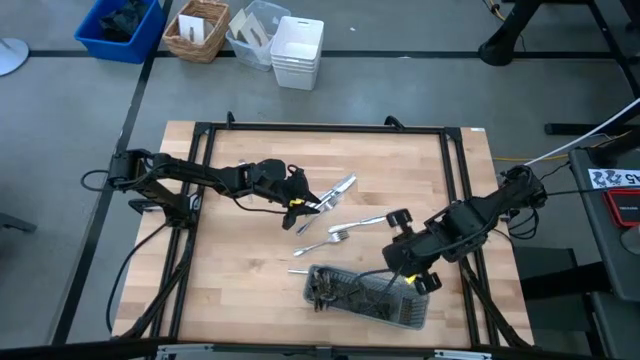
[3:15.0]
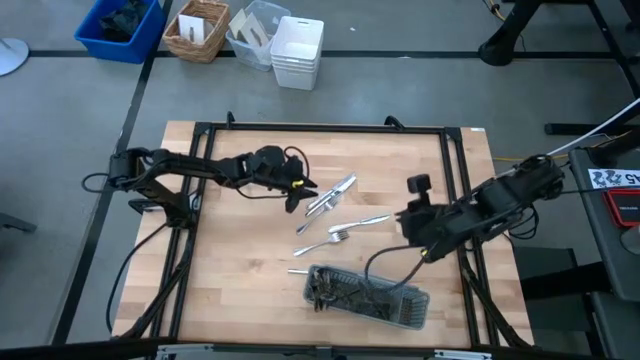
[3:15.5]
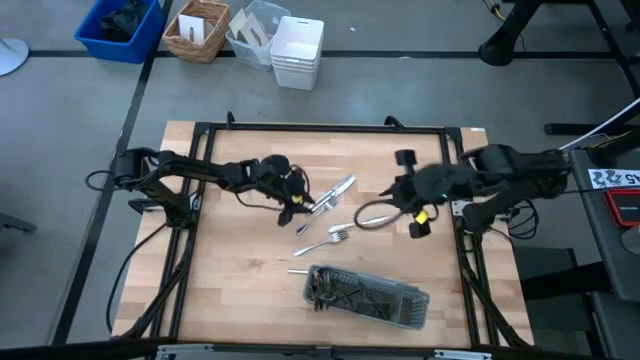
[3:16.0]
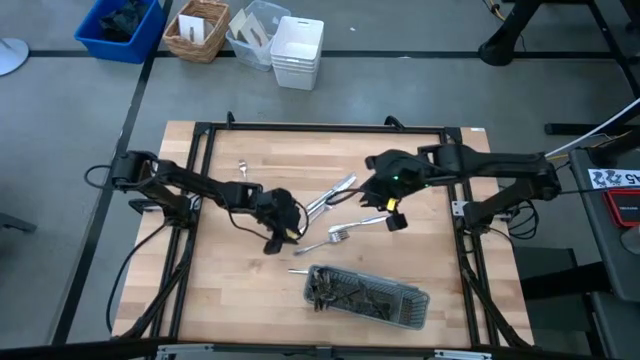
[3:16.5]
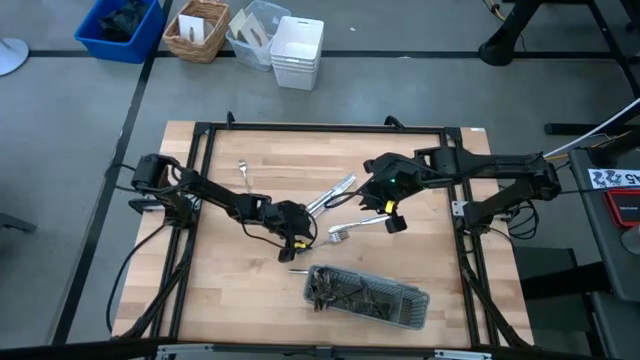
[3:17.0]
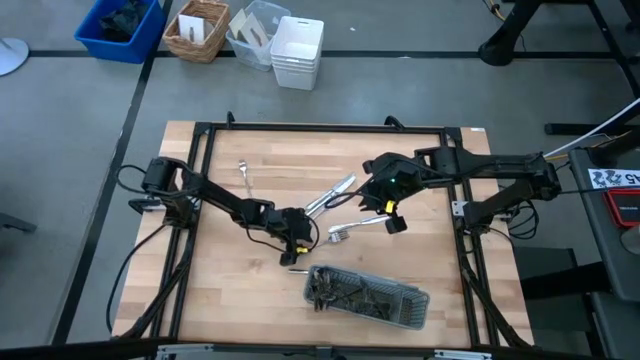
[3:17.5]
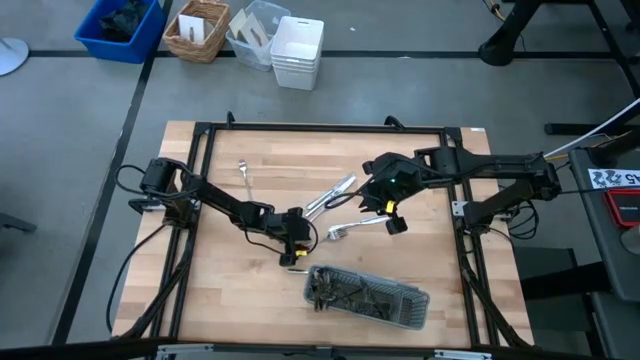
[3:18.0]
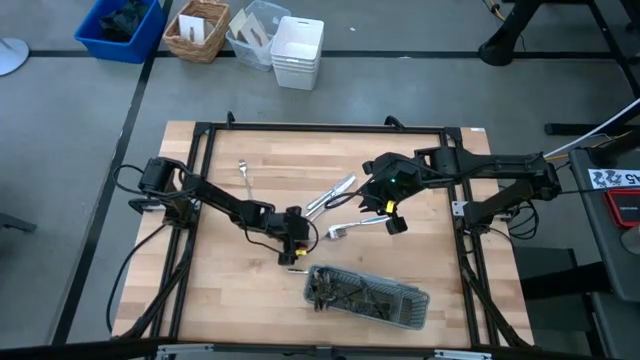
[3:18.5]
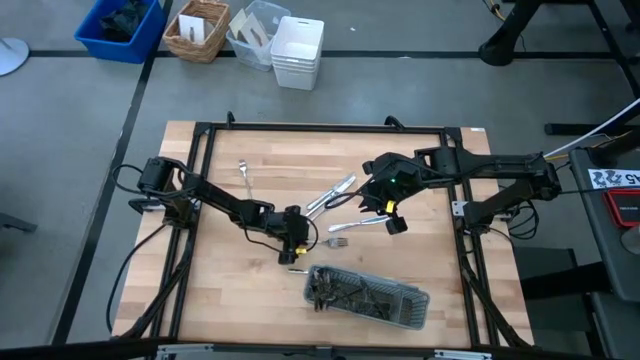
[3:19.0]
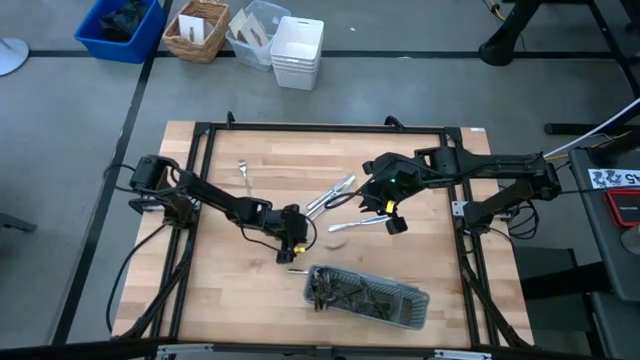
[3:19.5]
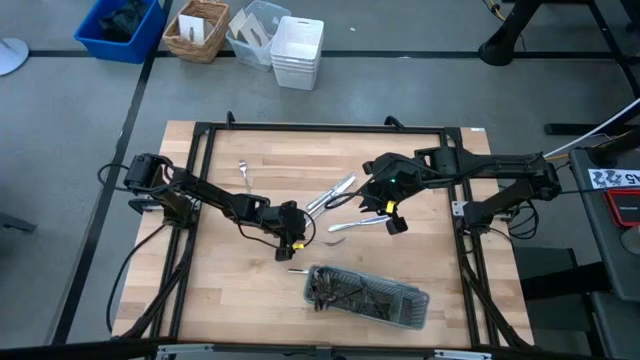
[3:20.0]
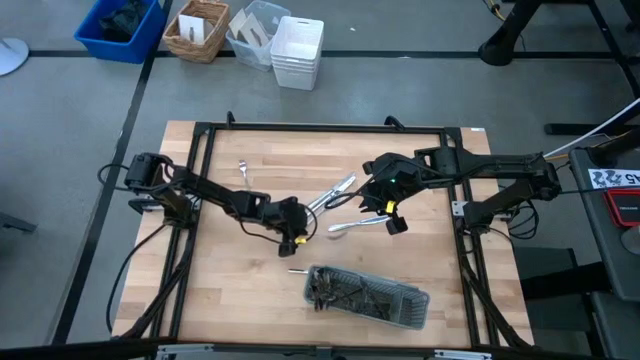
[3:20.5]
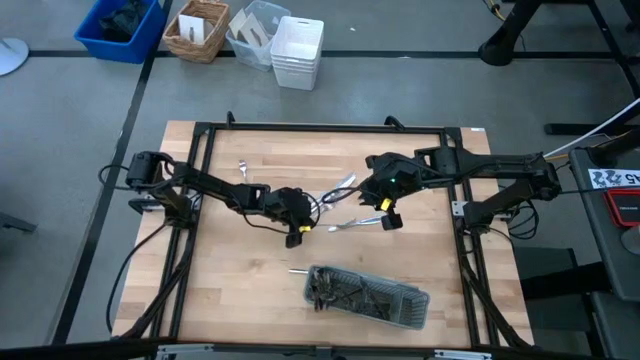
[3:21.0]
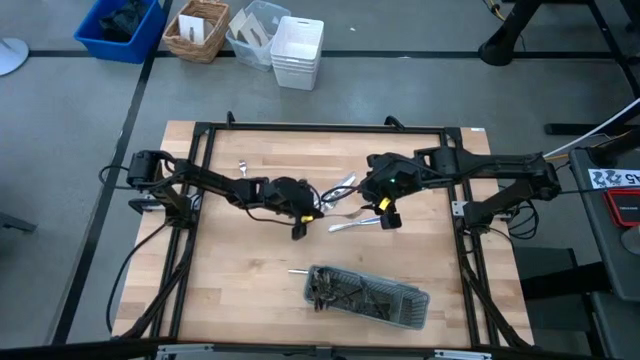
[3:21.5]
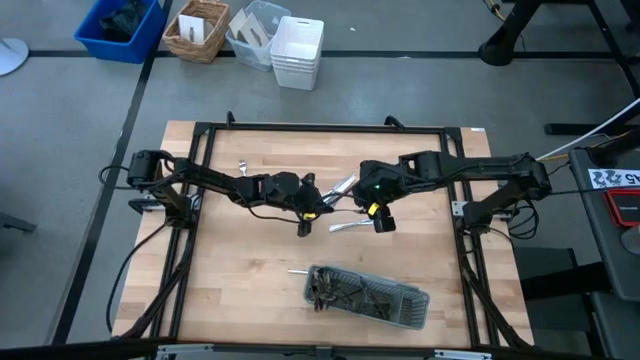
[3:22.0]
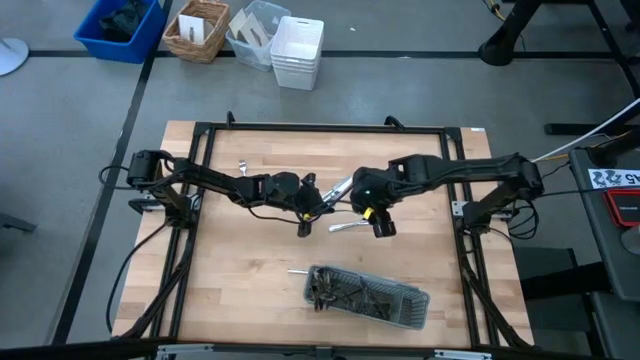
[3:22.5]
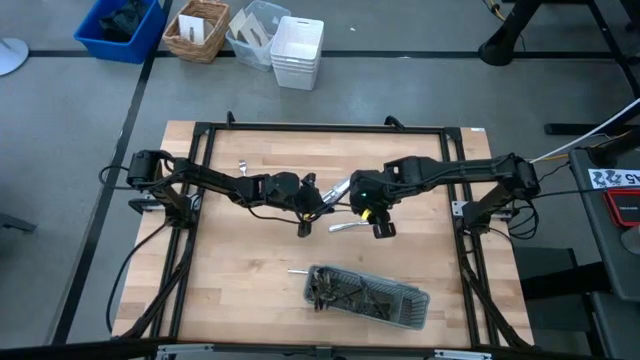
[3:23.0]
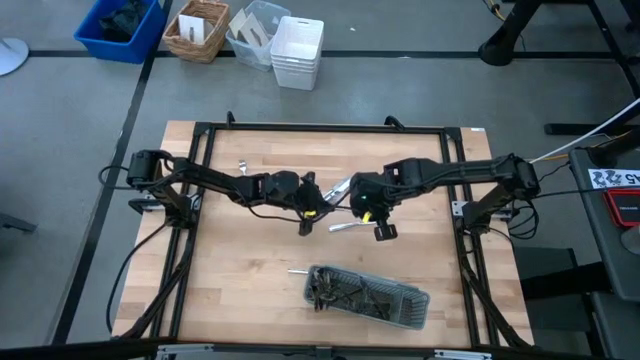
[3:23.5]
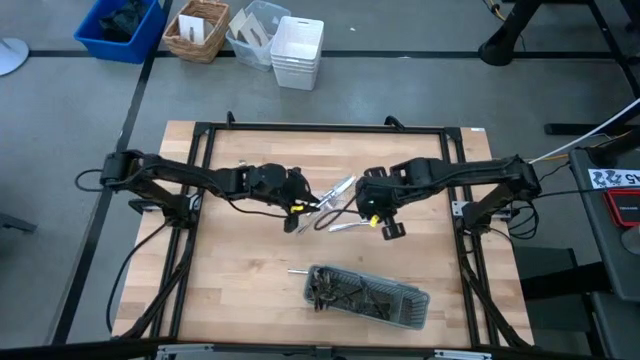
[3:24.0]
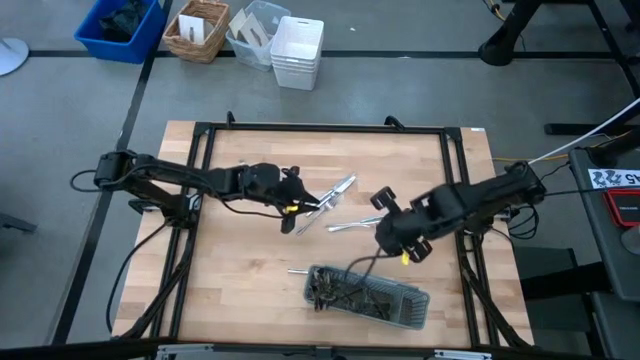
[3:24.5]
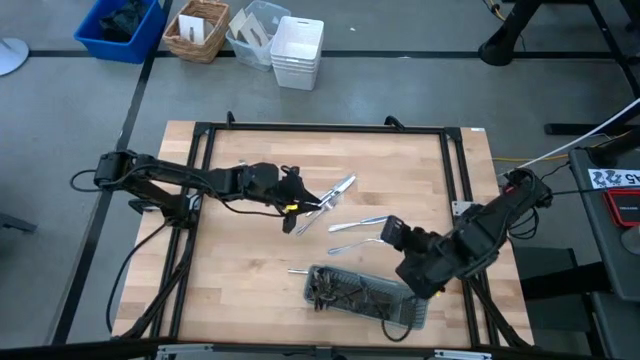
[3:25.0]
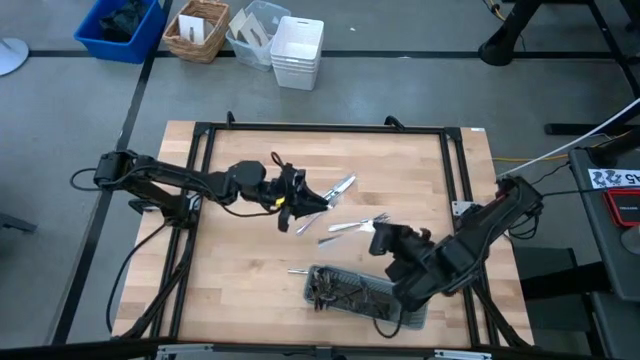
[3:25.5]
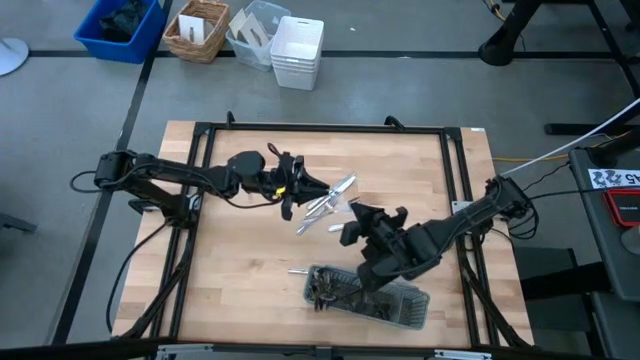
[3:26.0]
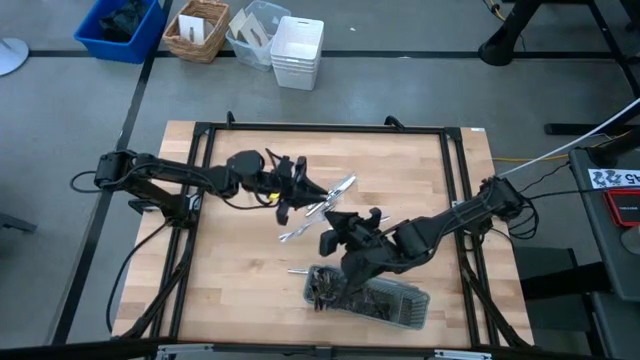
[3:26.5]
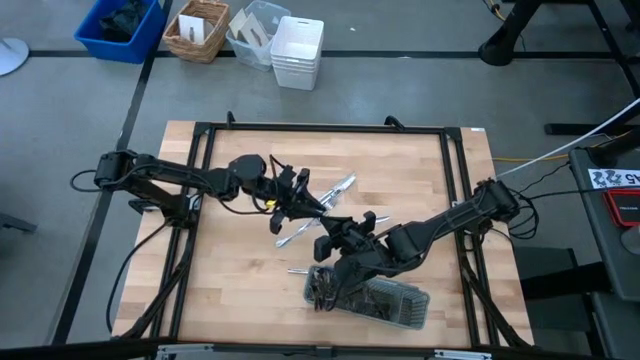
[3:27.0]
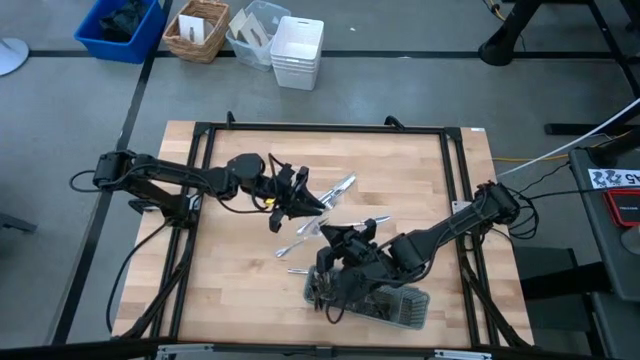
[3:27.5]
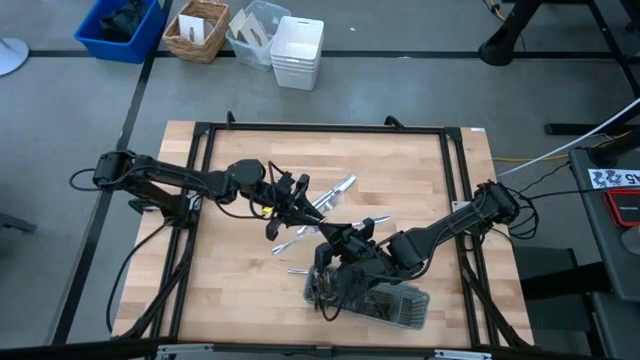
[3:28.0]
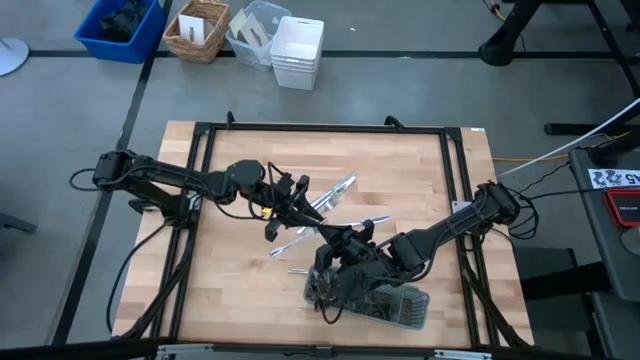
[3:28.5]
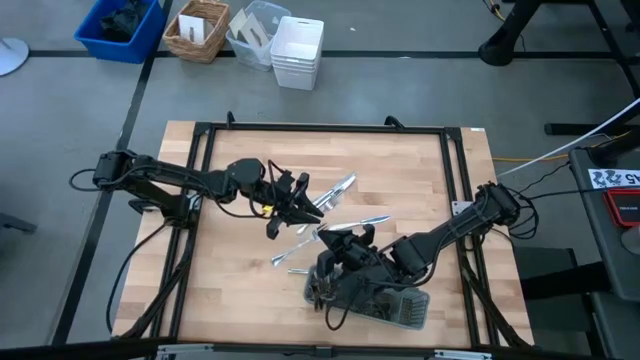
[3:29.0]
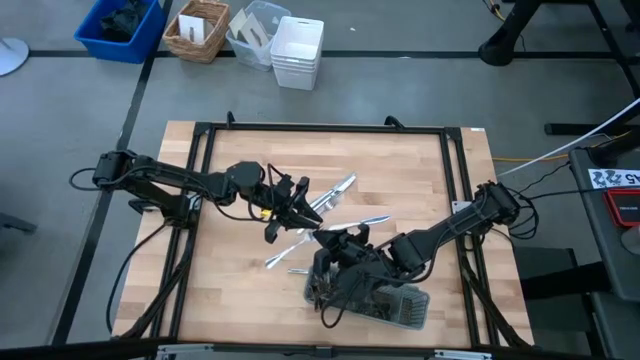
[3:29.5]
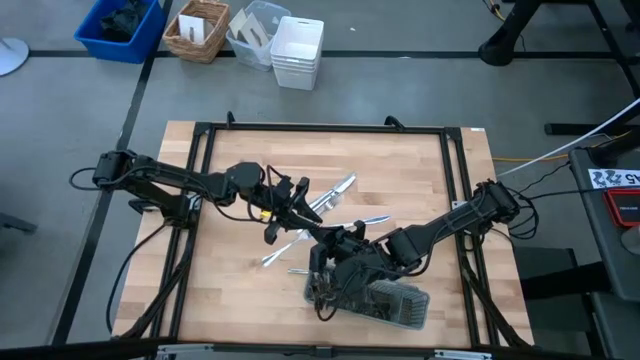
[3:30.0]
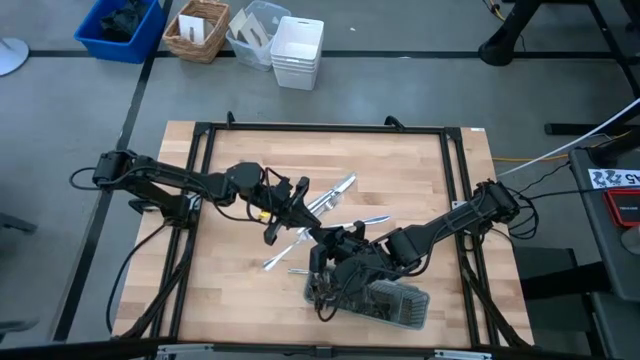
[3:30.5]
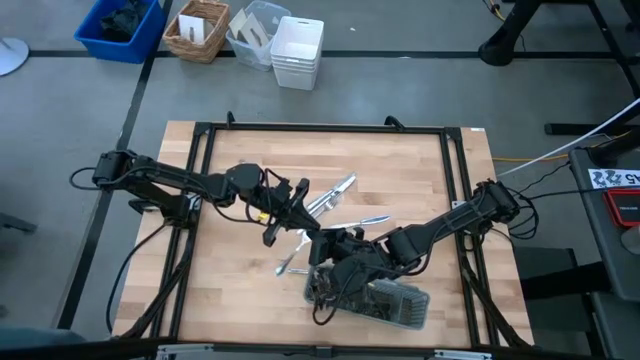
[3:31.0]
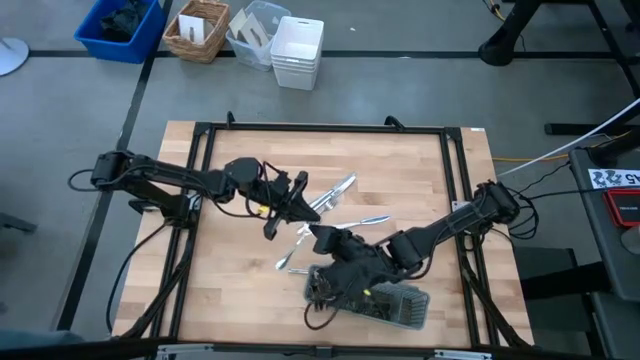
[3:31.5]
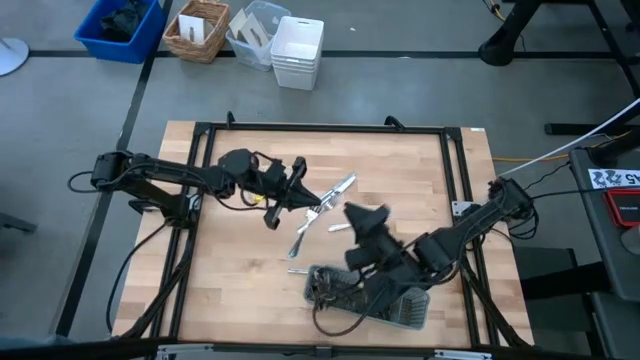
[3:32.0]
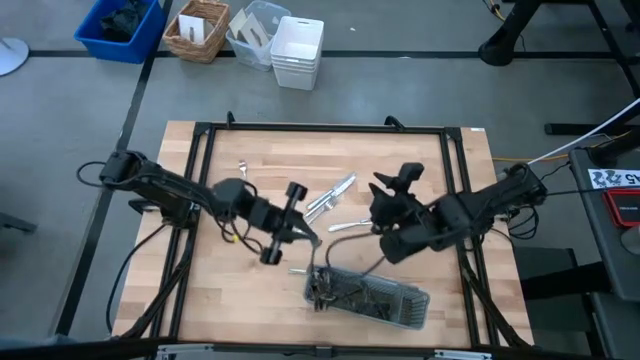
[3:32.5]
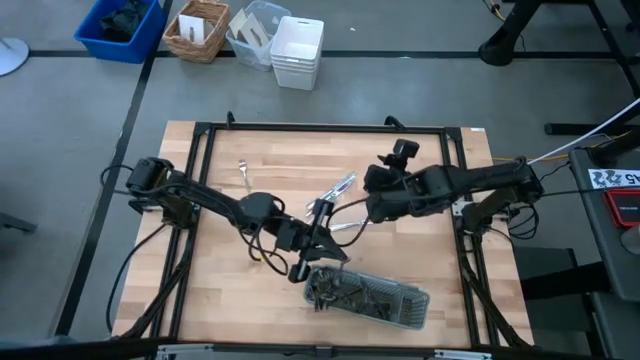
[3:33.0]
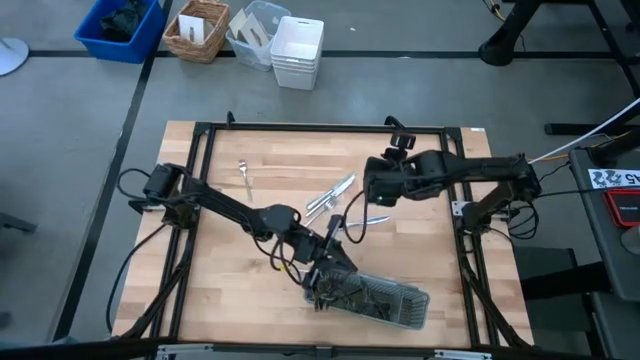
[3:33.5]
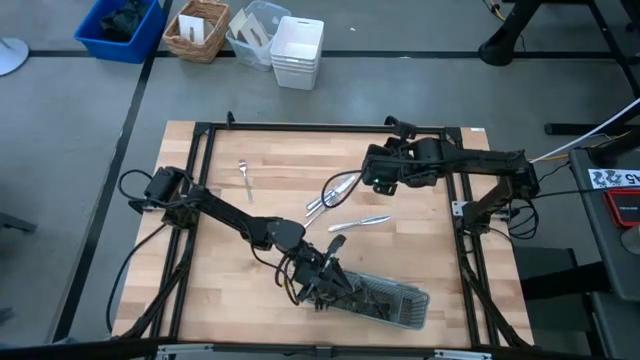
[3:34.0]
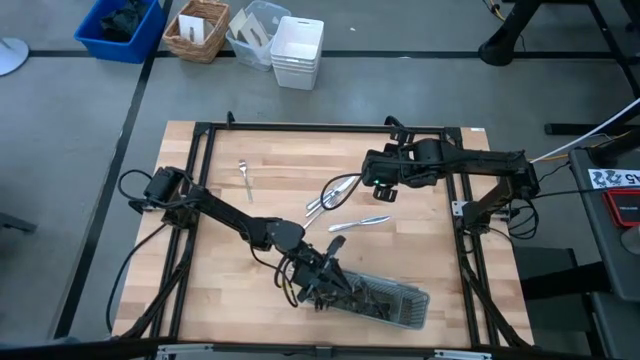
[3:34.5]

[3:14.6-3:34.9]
Task: Sort silverware
Put the fork into the gray silverware rack

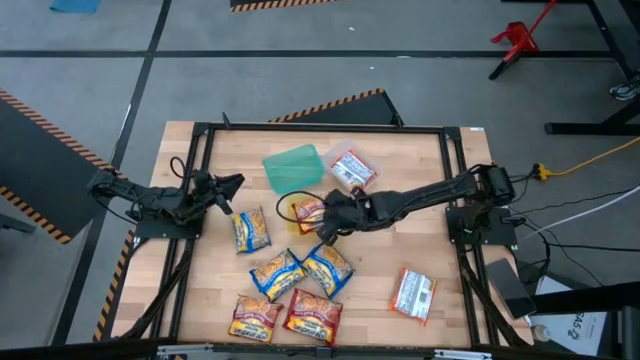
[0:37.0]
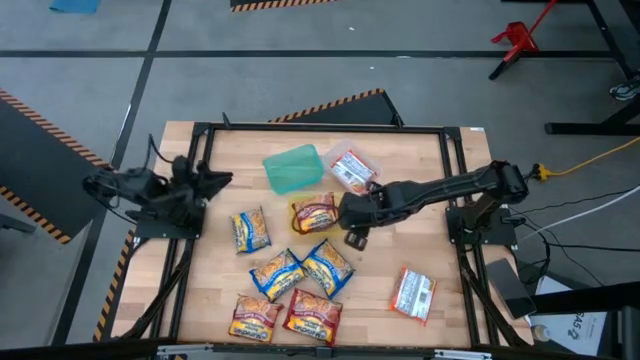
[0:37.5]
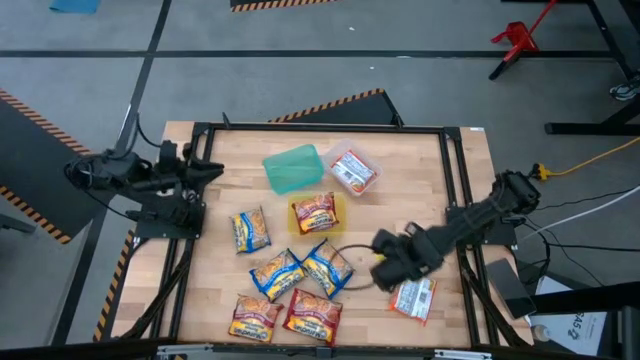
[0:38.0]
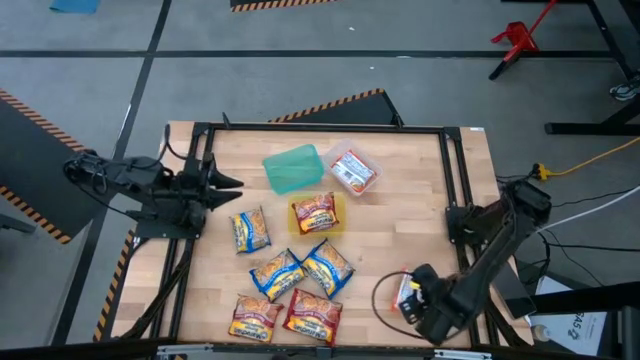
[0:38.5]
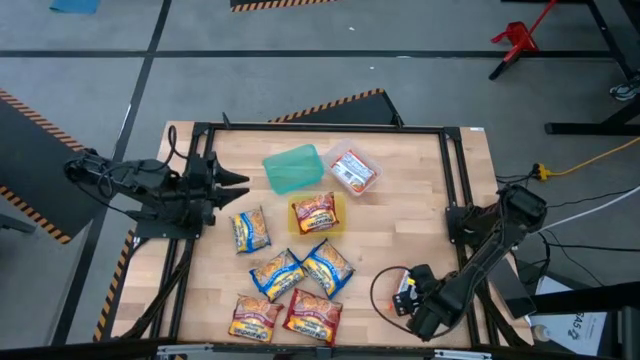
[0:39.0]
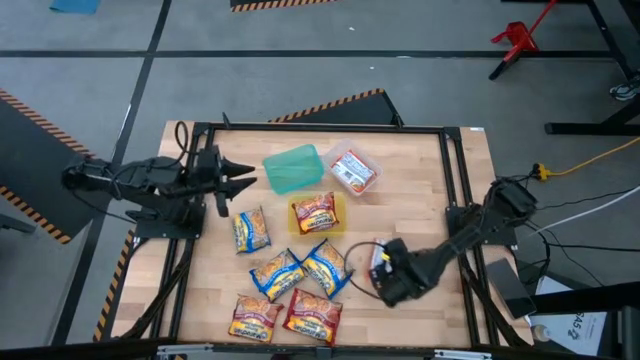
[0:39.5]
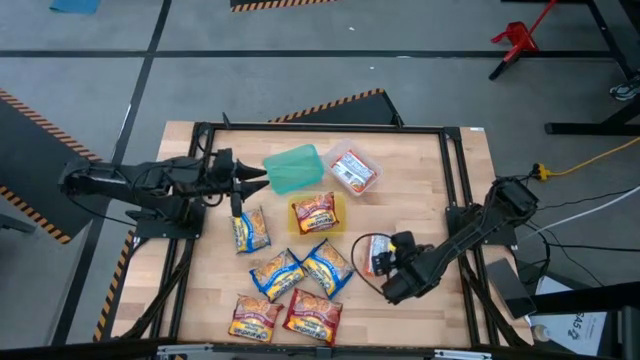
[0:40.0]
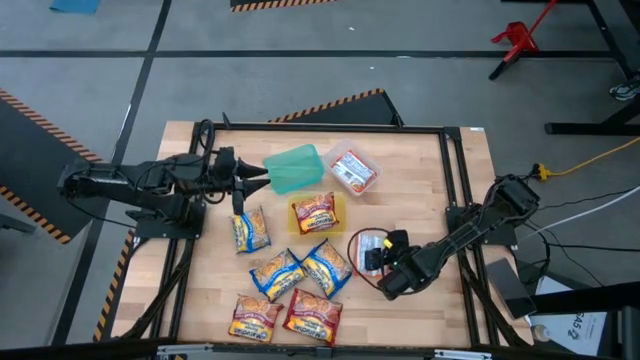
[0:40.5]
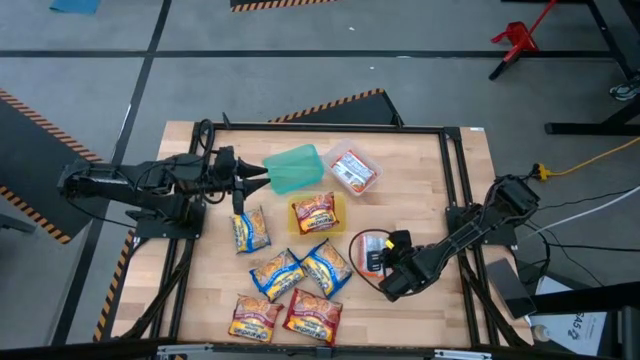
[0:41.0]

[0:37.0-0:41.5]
Task: Sort Maruchan noodles
Put the orange noodle pack into the white bin
